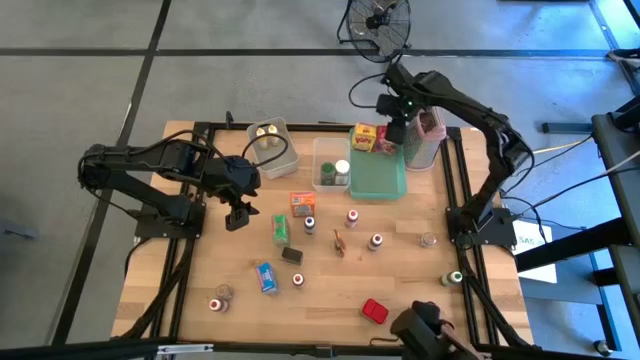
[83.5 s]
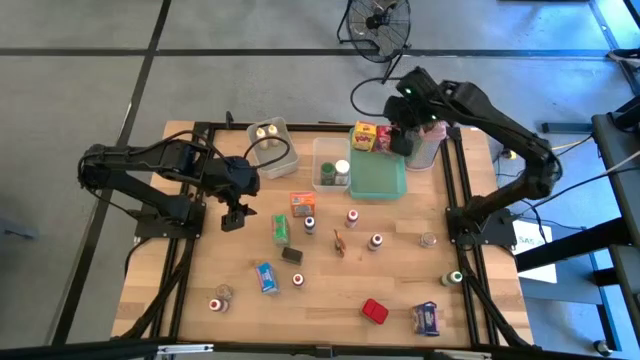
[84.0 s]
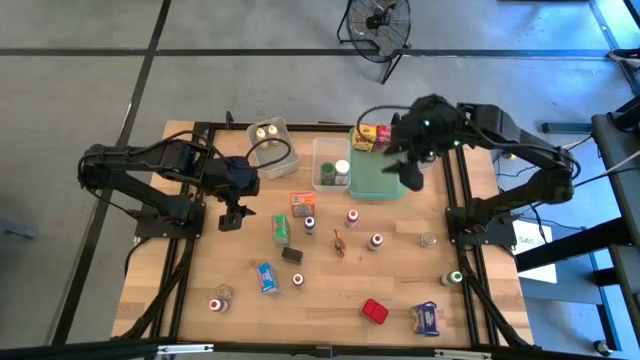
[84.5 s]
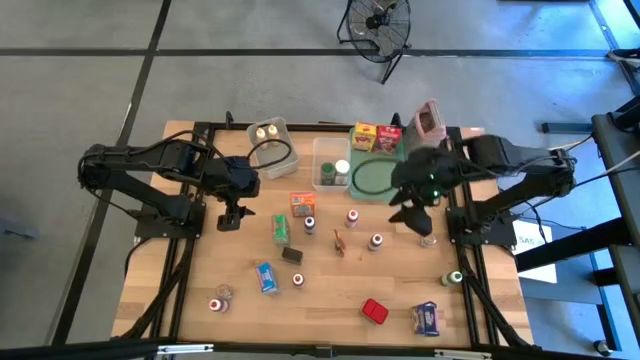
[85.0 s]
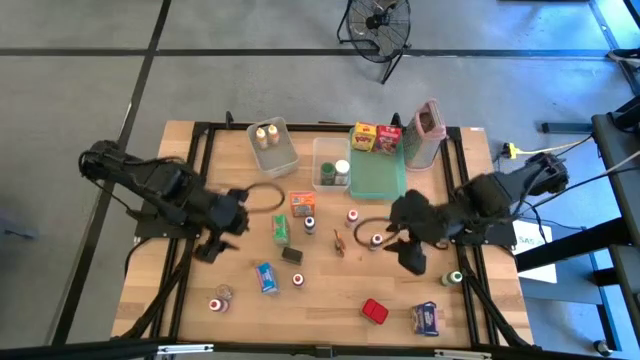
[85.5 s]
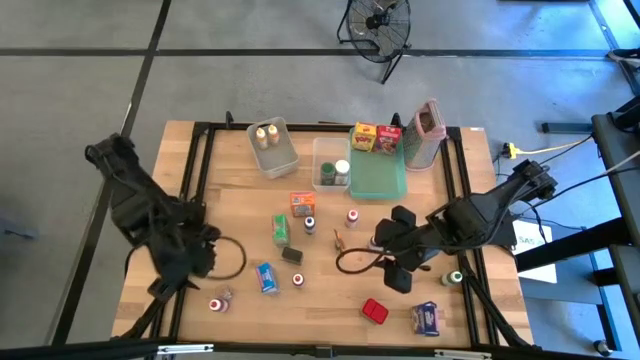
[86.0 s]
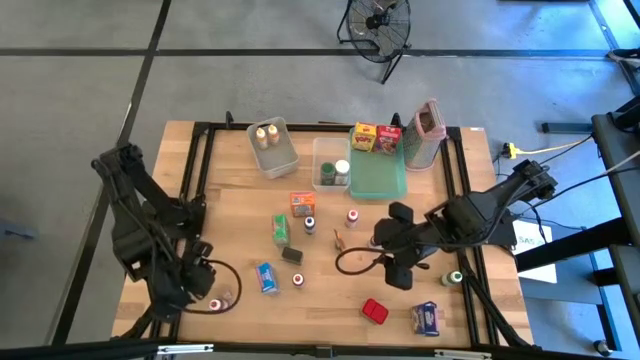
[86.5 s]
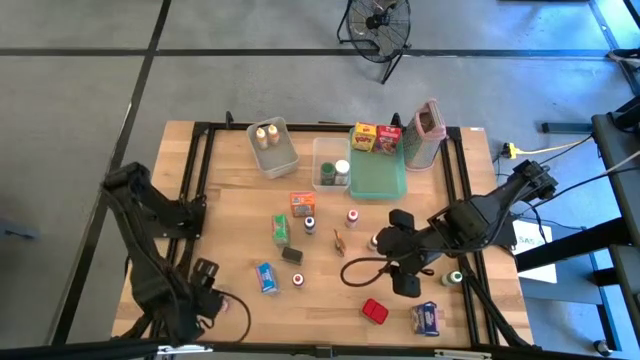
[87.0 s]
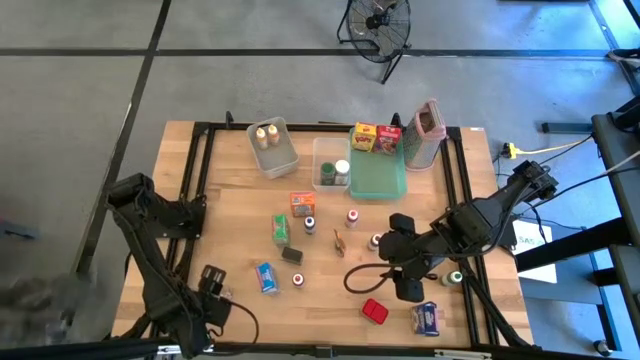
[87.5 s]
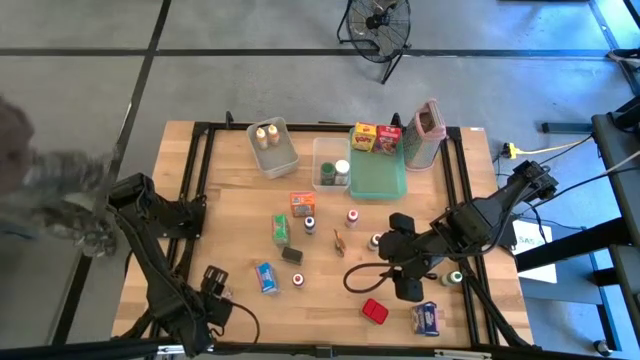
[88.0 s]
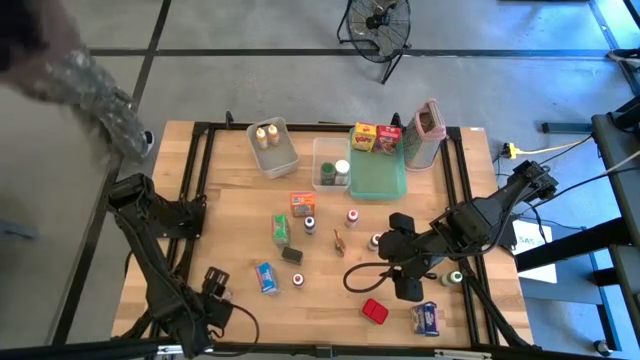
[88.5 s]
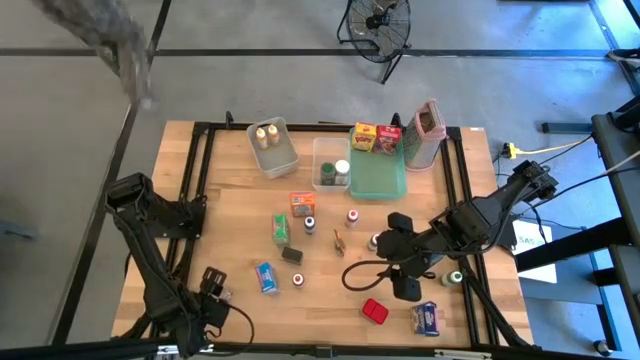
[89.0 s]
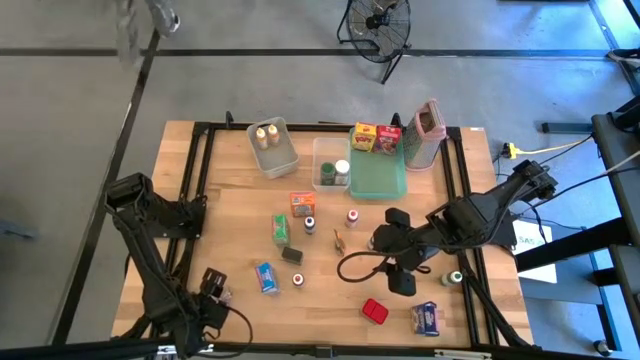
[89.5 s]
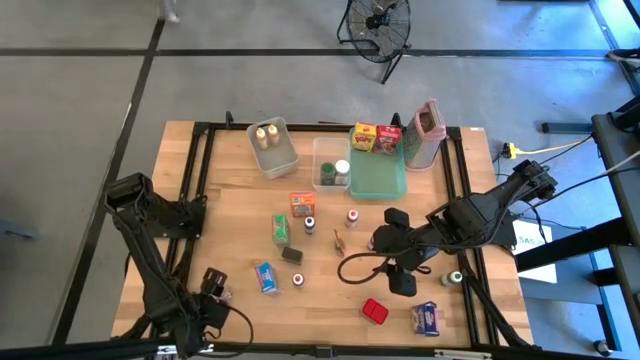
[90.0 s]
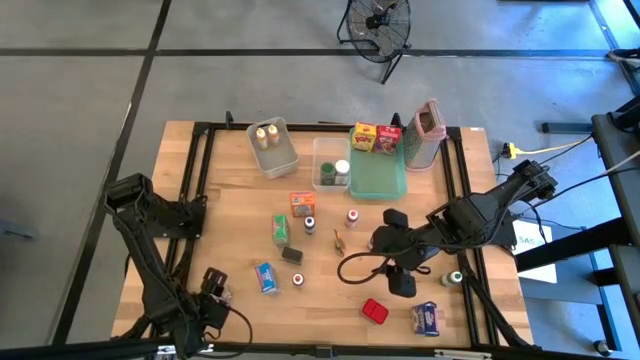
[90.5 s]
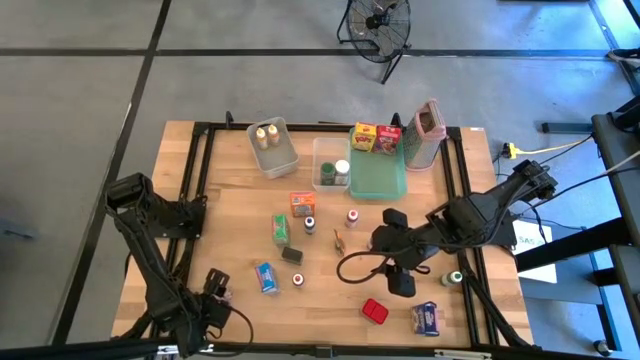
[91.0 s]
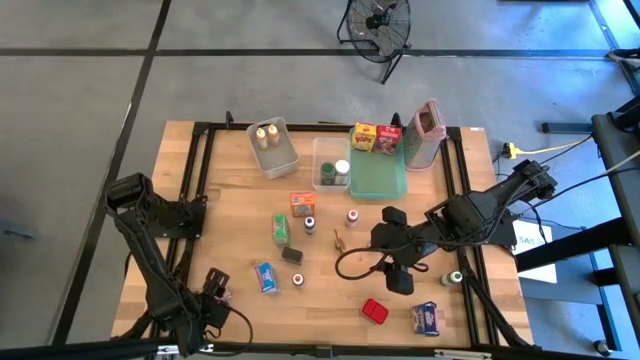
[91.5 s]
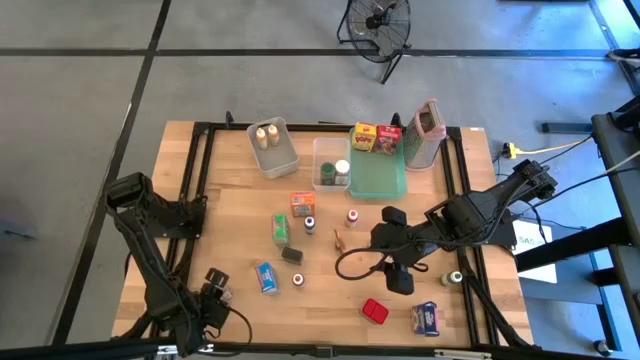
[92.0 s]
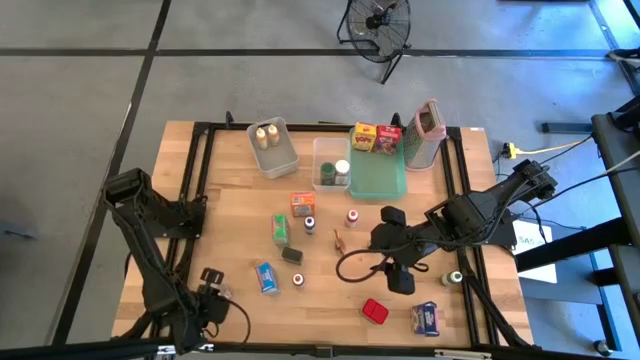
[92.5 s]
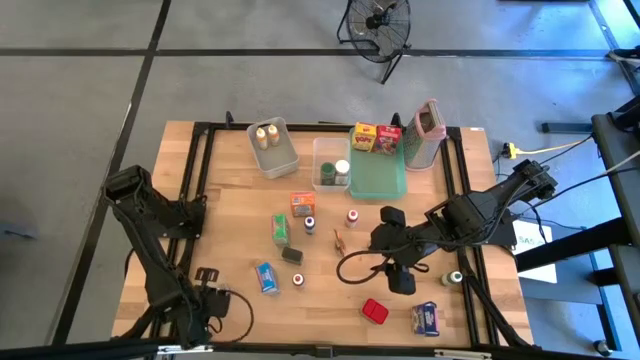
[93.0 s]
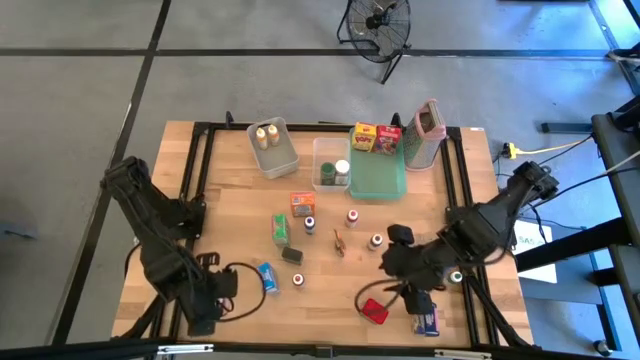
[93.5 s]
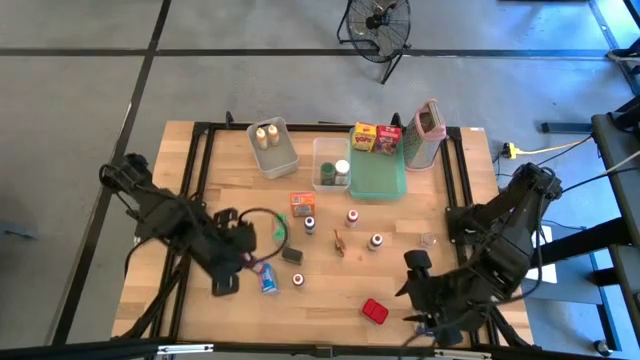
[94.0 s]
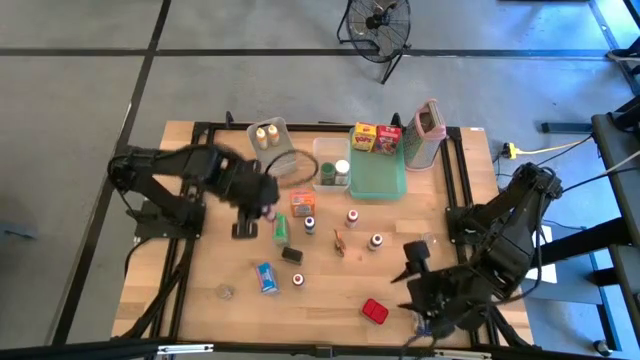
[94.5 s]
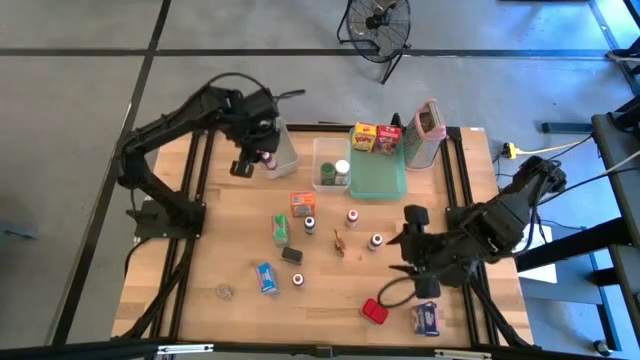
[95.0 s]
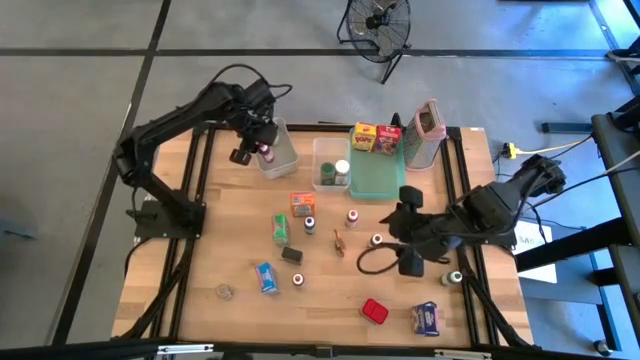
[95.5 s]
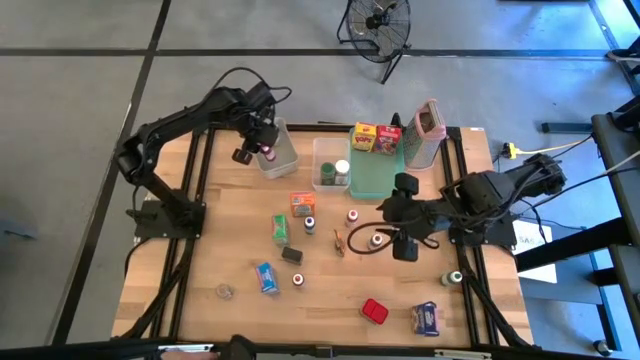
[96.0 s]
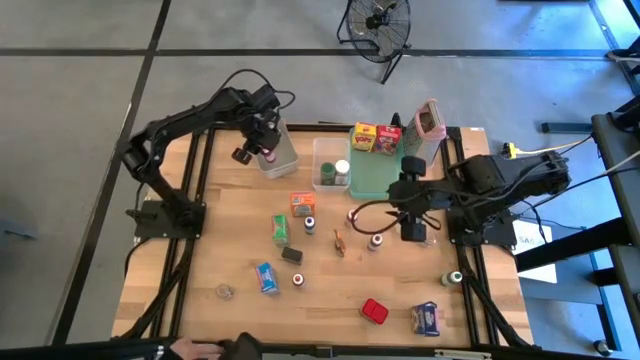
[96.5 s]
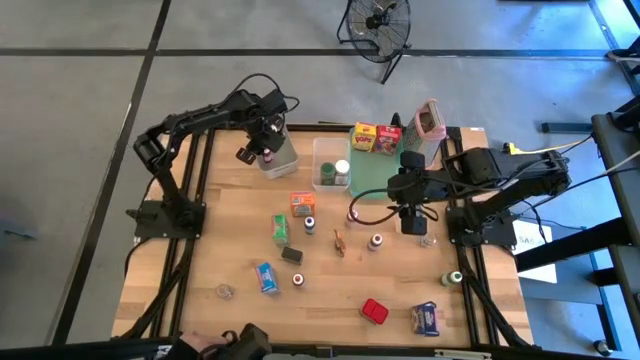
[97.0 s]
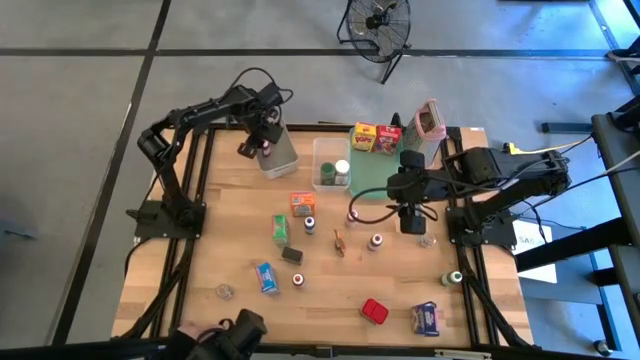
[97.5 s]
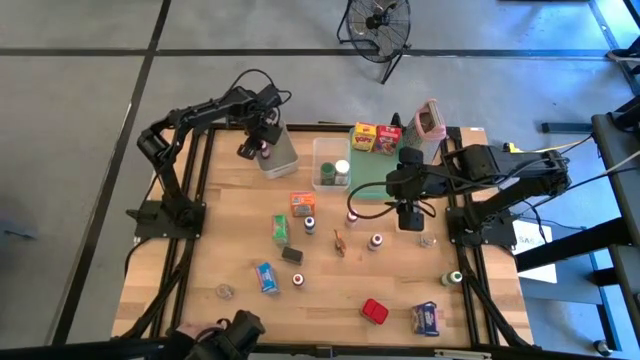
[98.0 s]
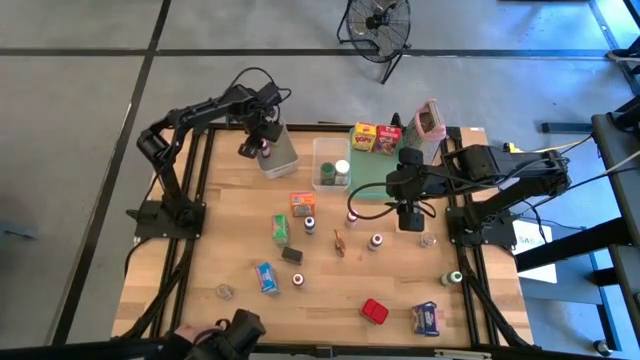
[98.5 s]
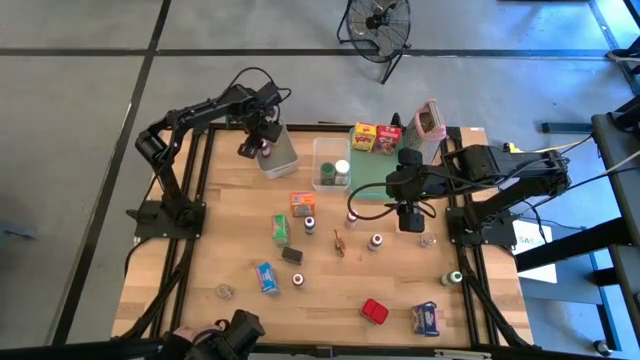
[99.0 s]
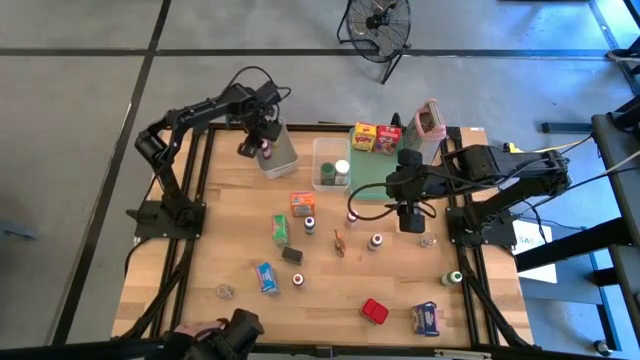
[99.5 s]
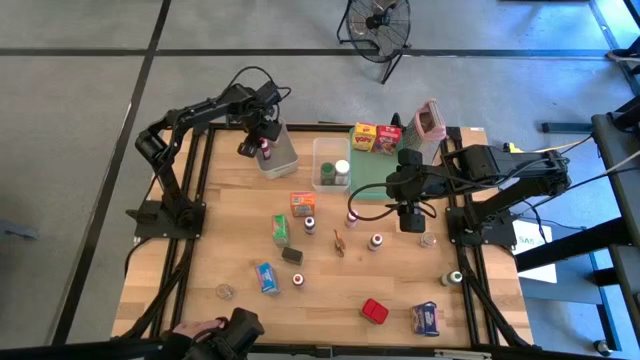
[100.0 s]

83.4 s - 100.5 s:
Task: Pick & Place Kitchen Items
Put the red food coloring bottle into the gray bin

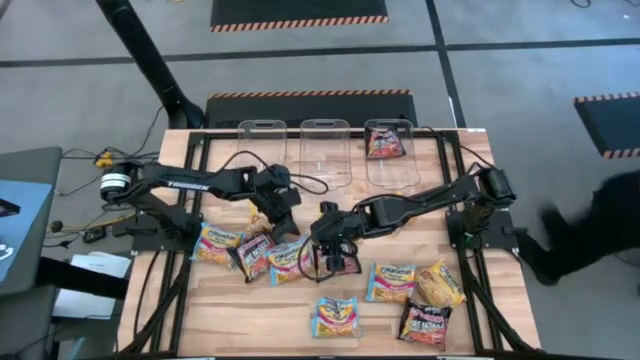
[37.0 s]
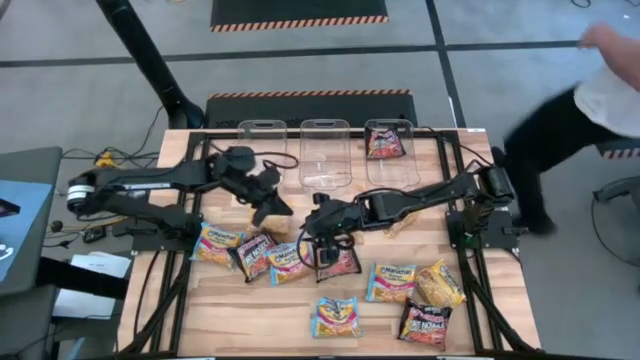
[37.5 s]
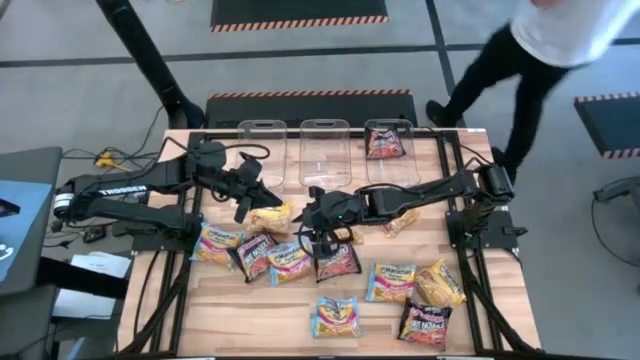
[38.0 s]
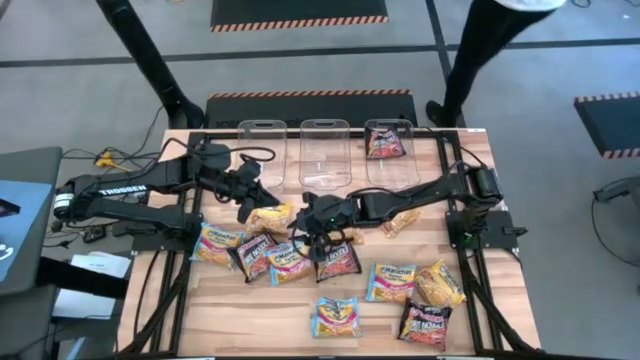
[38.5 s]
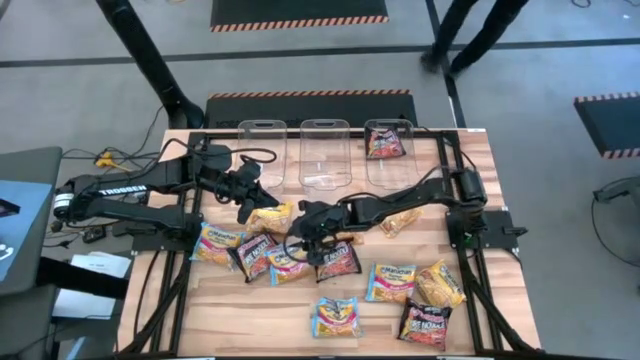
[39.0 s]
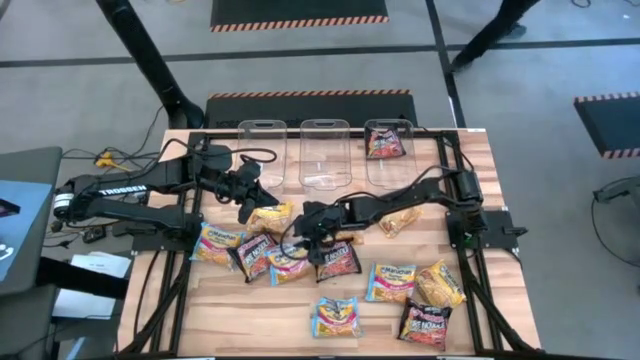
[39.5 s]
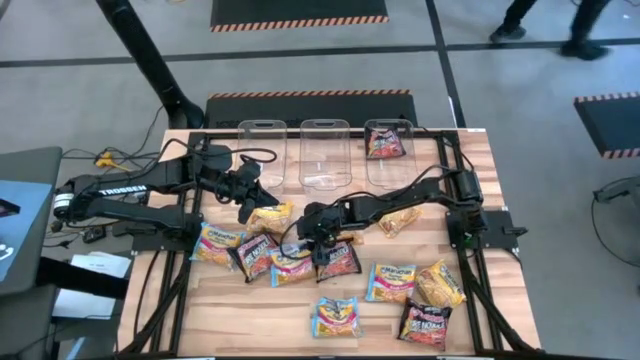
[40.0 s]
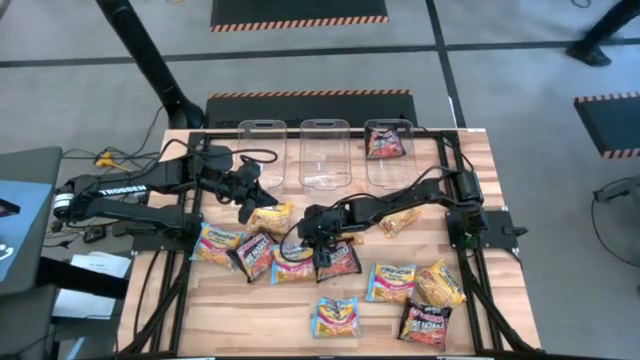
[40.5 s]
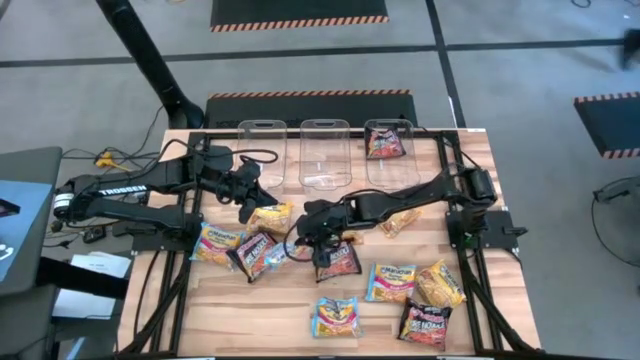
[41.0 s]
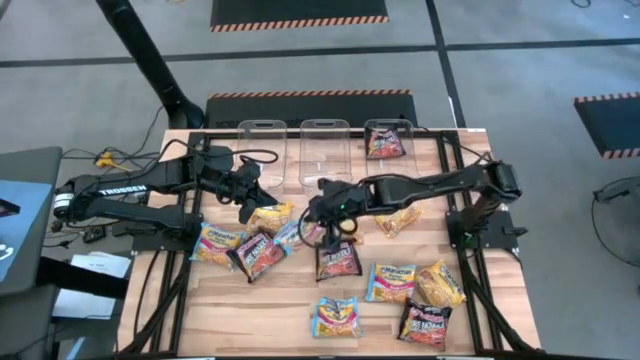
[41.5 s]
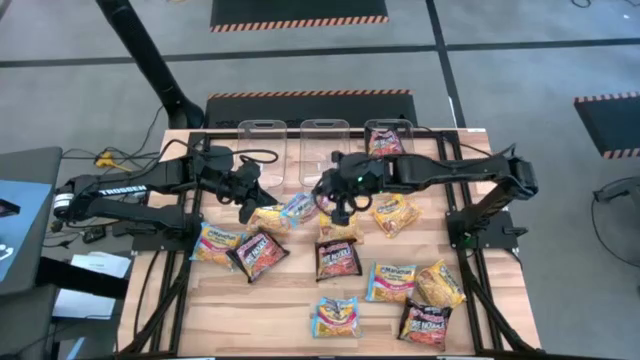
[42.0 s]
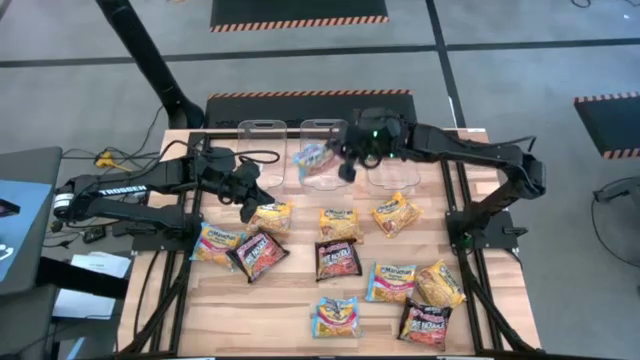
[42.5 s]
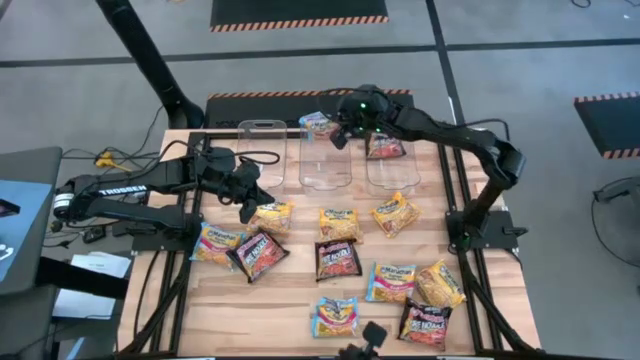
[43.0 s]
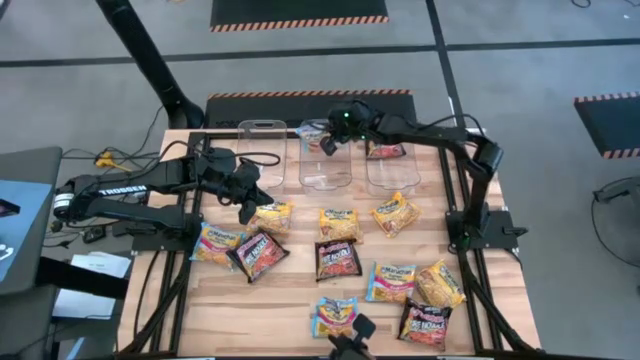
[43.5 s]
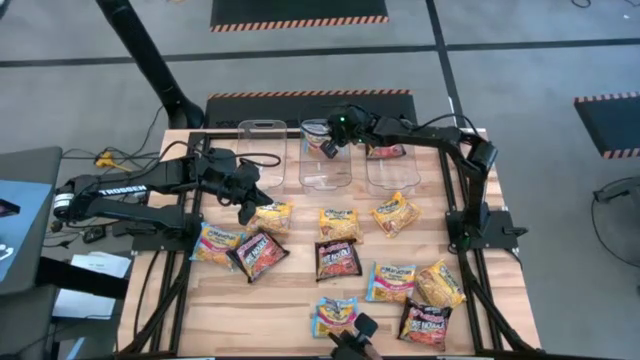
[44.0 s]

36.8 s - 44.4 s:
Task: Sort Maruchan noodles
Put the blue noodle pack into the middle transparent bin
